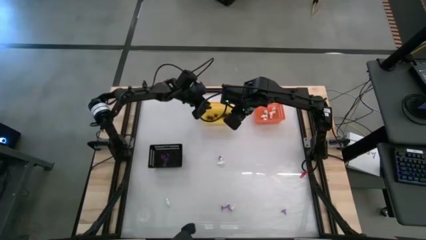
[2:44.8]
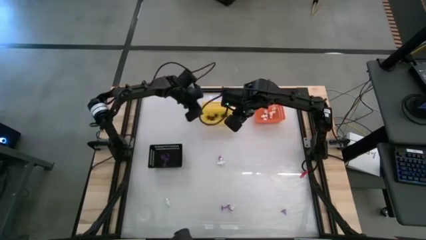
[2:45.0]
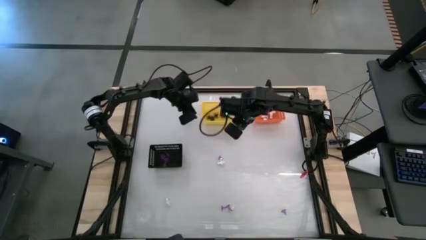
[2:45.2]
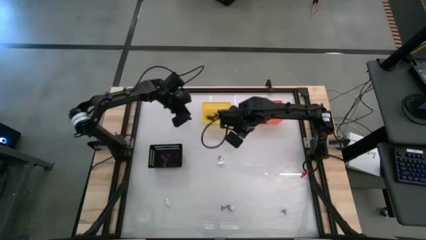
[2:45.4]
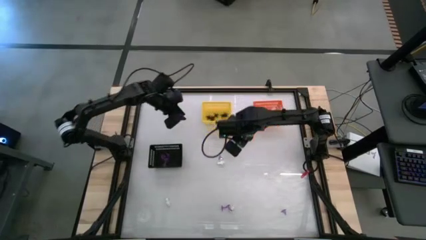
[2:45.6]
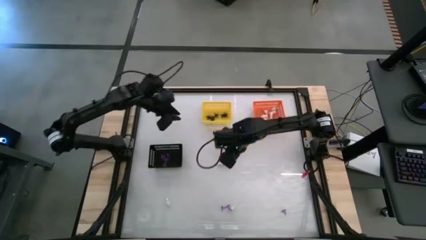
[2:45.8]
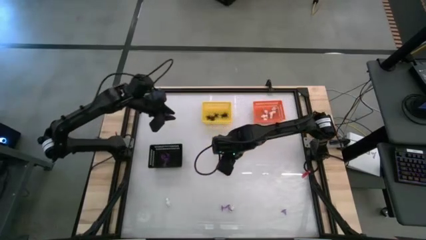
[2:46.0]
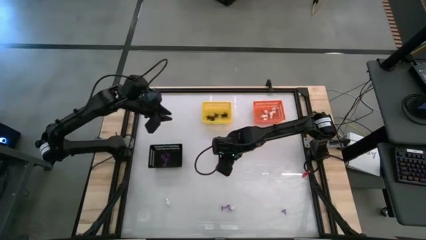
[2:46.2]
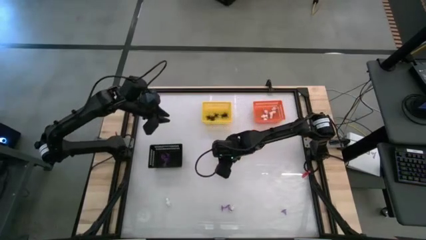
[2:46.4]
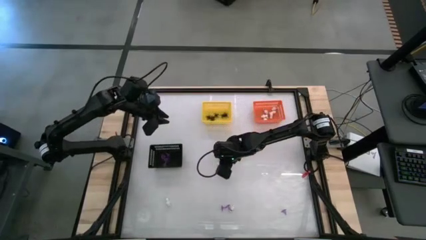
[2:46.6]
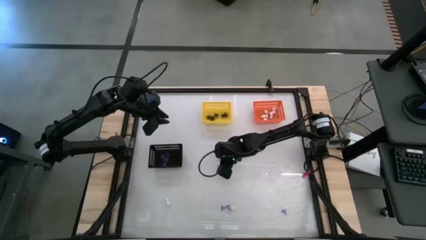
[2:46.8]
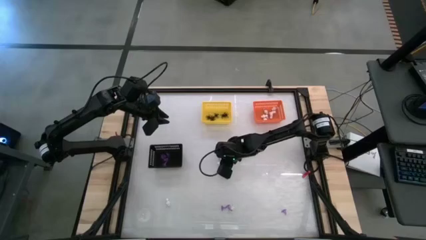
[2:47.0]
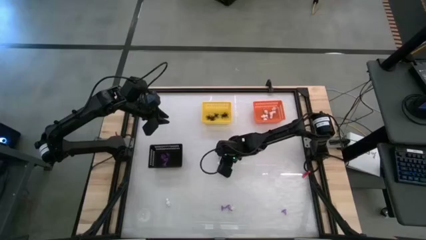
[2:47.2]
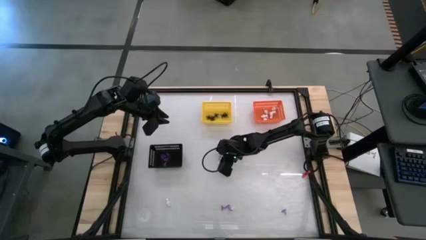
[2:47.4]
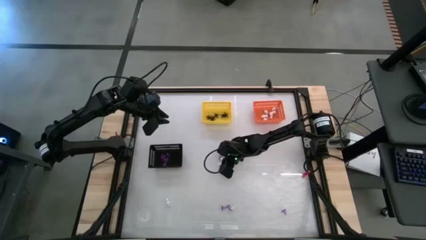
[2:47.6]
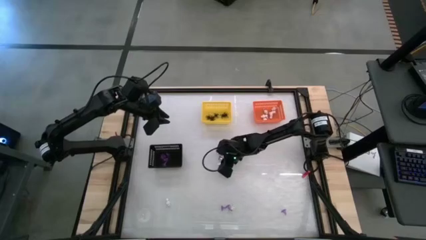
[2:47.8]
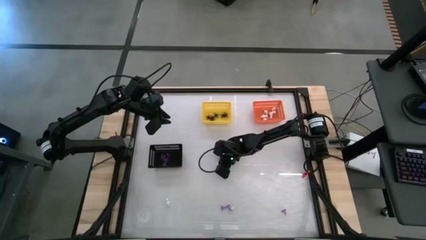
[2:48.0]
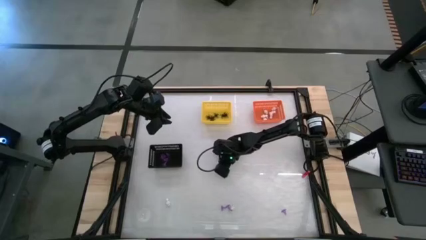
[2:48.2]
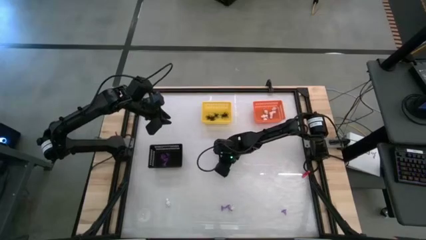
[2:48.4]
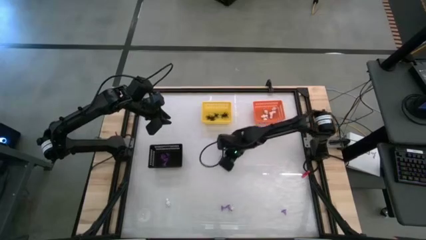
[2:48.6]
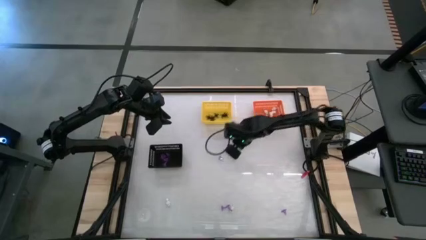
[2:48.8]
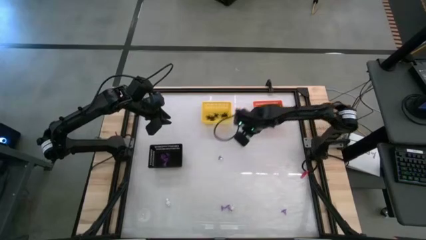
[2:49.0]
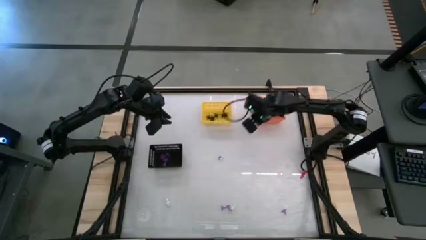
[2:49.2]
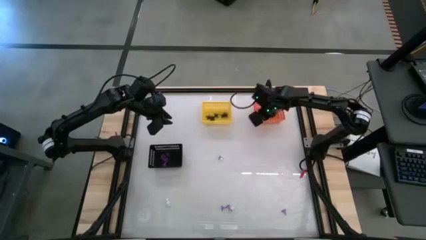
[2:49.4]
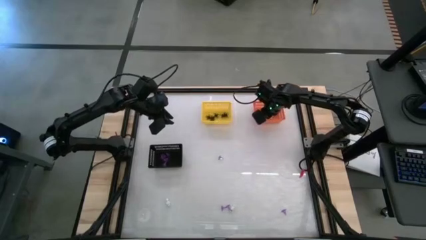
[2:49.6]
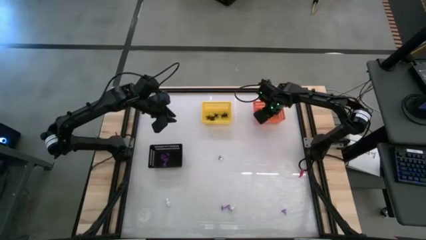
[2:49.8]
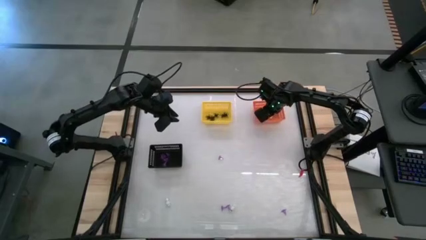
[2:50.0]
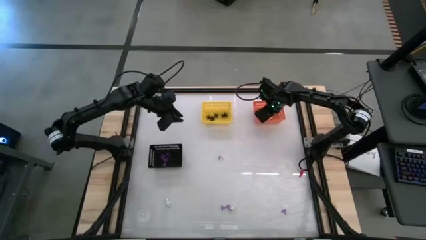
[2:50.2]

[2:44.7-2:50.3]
Task: Sort Halloween decoration
Put the white skeleton toy into the orange basket

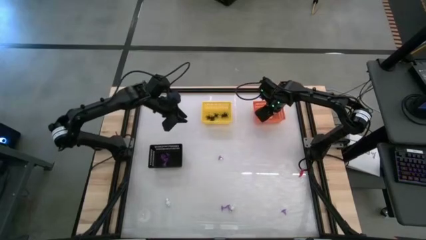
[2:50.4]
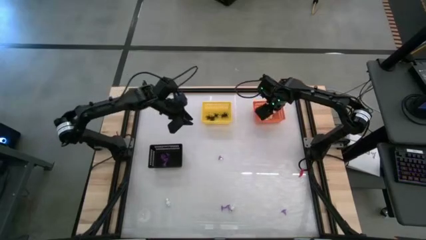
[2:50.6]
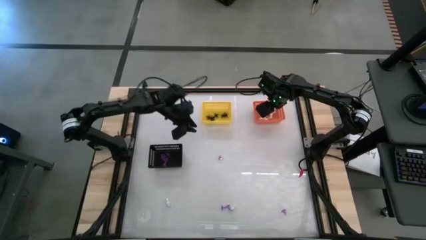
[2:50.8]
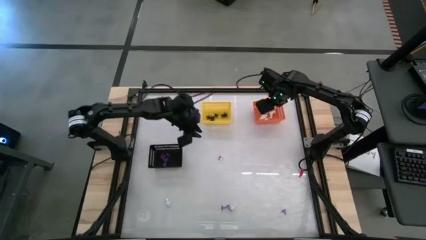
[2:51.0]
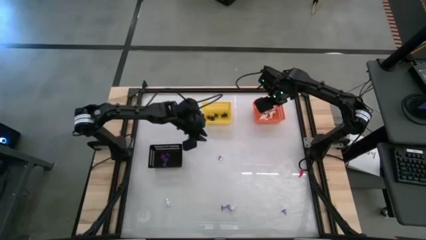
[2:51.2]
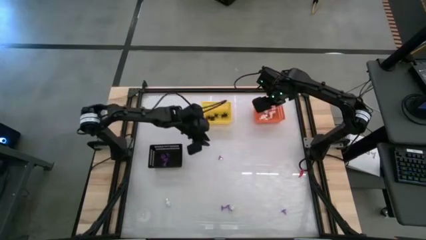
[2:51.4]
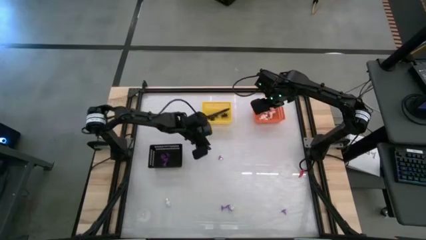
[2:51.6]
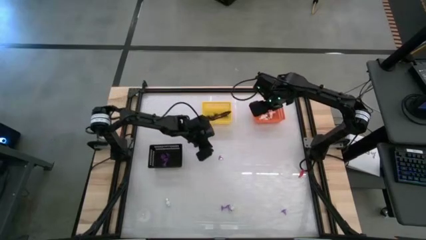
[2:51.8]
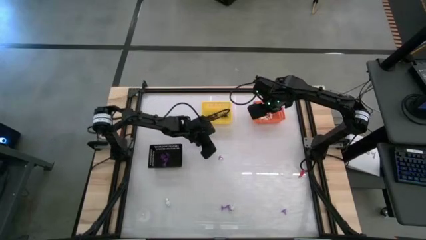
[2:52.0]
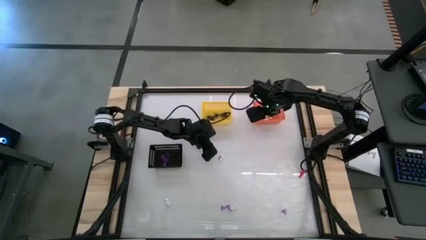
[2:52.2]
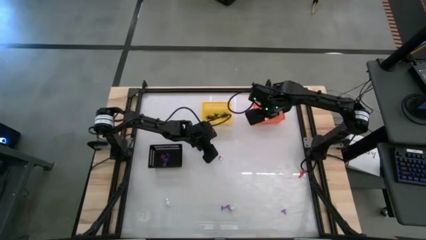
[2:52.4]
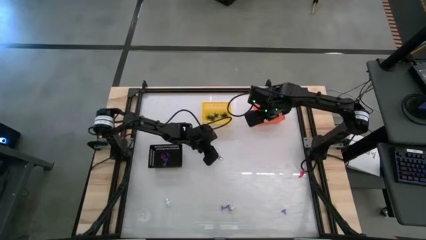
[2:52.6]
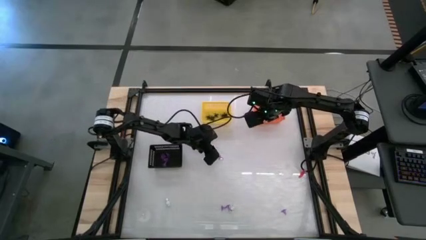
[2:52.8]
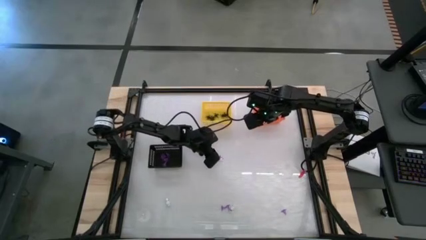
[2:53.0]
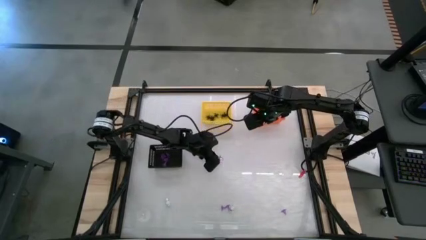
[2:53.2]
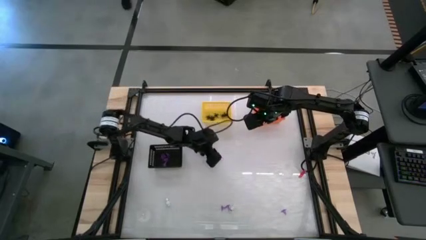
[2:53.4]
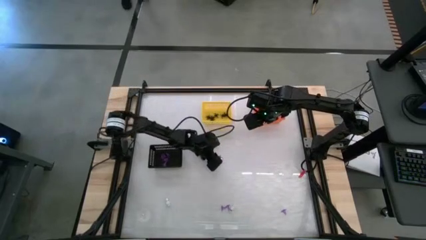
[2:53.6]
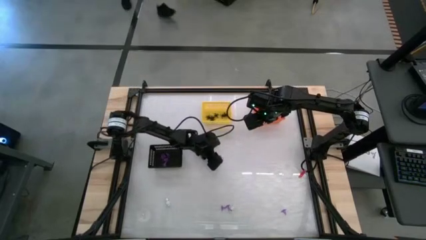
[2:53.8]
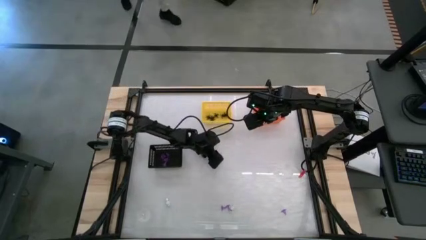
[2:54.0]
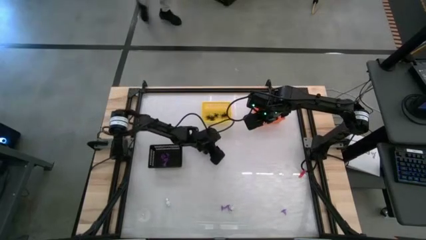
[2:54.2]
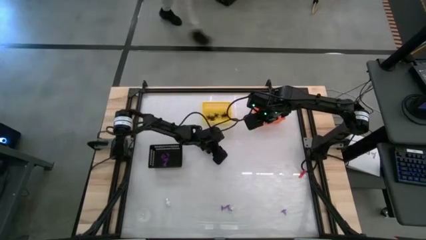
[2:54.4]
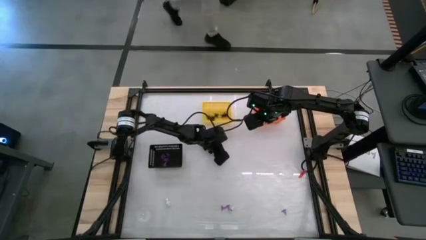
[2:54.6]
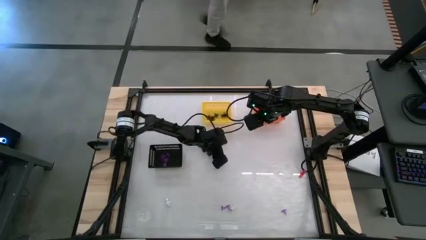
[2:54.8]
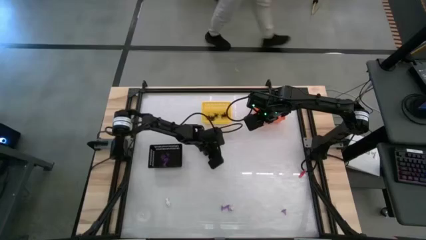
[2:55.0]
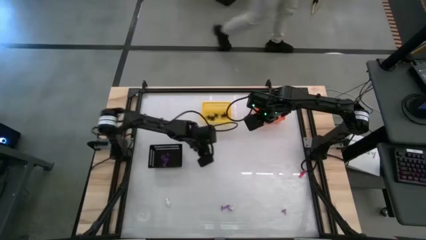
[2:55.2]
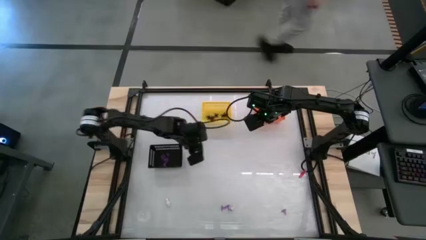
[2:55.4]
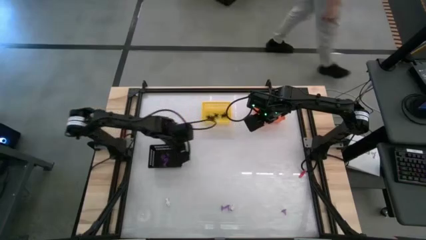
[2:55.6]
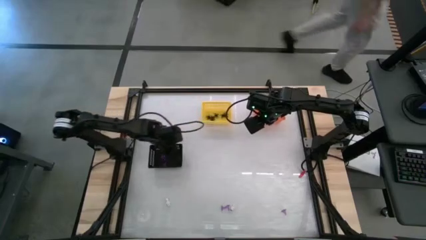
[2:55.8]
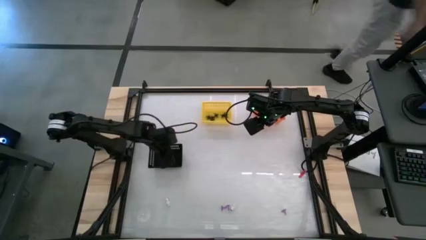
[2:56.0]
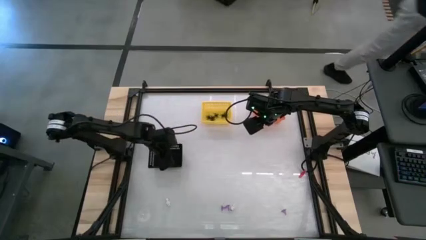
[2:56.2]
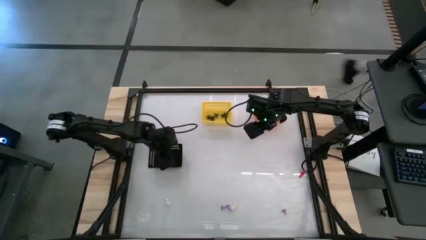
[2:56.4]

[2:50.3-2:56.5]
Put the purple hat toy into the black basket

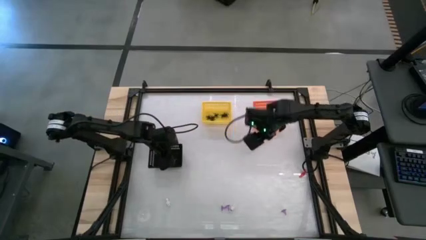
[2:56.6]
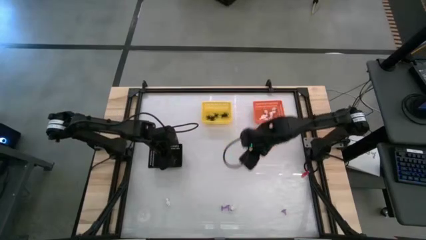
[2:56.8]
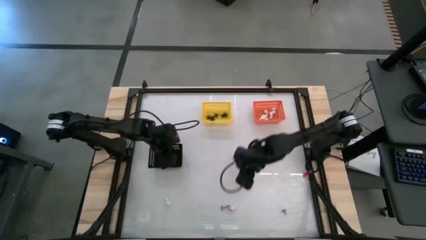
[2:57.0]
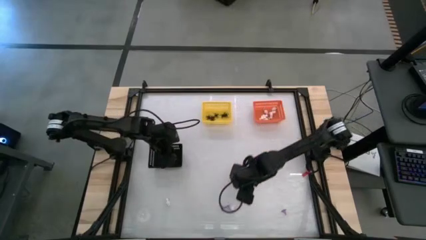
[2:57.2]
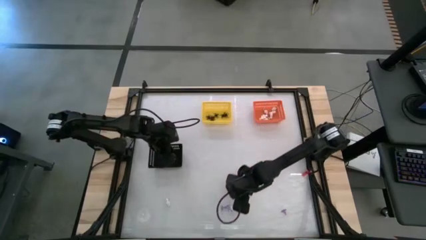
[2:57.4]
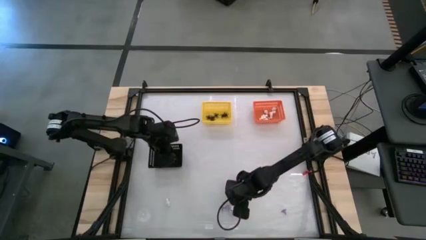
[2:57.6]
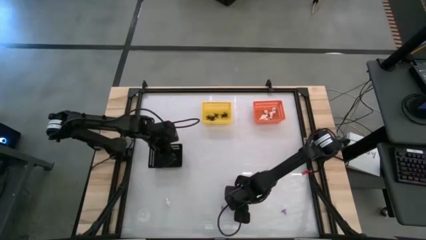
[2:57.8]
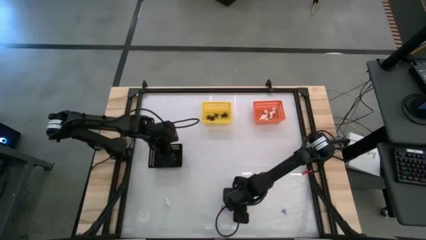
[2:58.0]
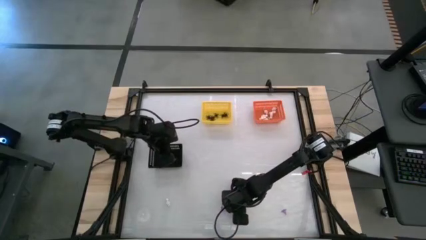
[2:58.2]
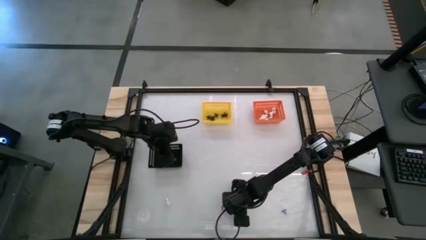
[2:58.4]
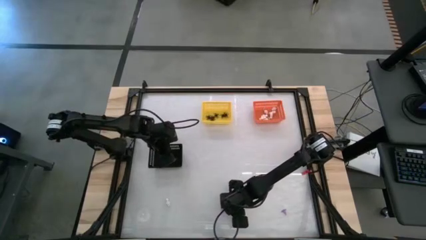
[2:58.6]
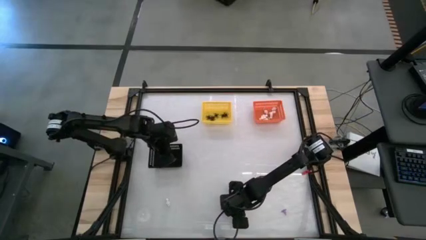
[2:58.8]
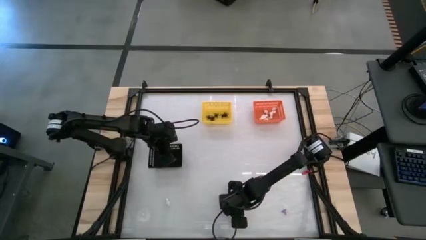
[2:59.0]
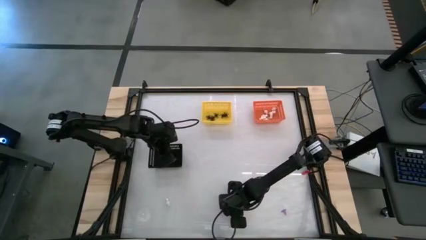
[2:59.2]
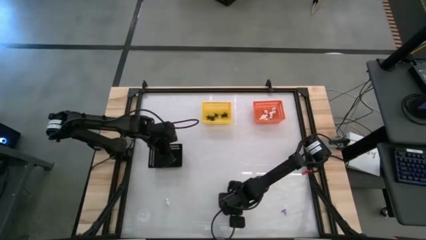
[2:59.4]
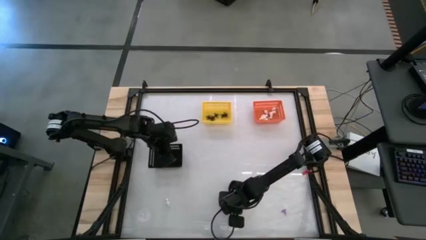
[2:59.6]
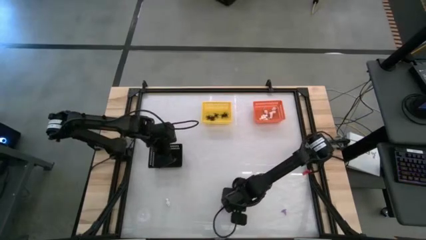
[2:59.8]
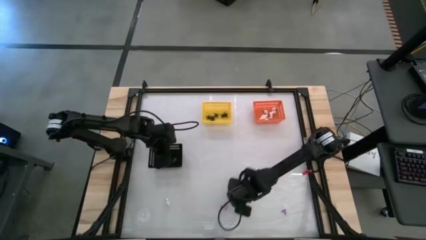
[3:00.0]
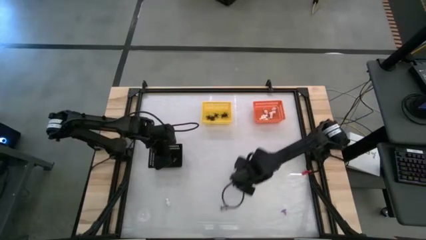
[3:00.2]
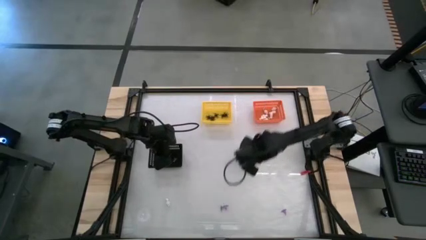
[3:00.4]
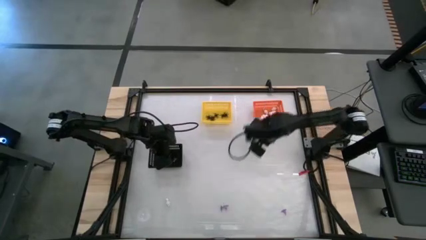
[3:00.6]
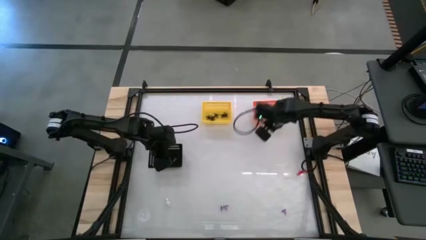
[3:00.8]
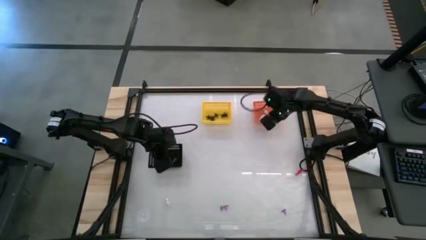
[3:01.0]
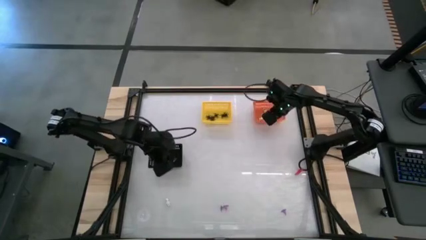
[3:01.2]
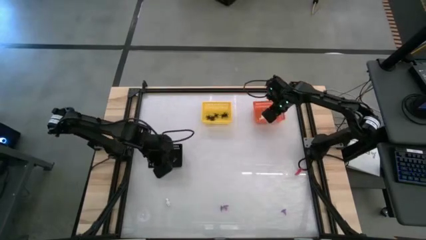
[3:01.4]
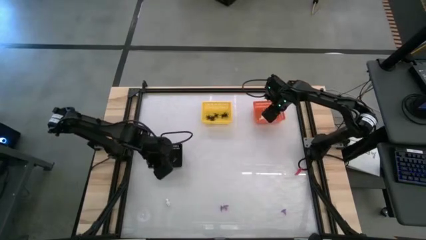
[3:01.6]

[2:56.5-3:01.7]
Put the white skeleton toy into the orange basket
